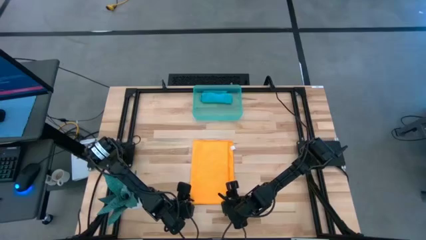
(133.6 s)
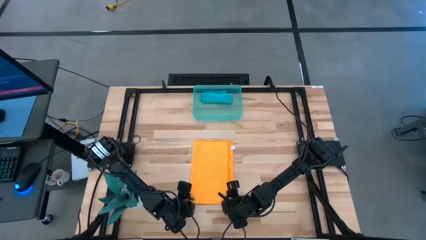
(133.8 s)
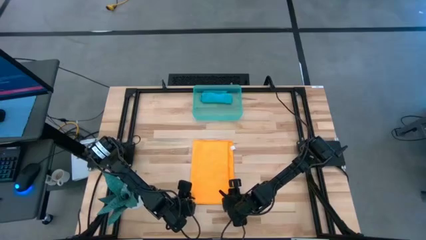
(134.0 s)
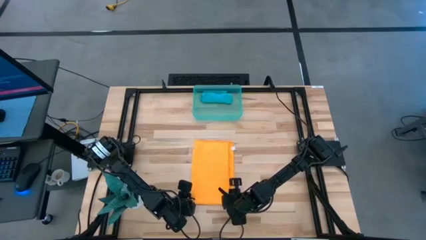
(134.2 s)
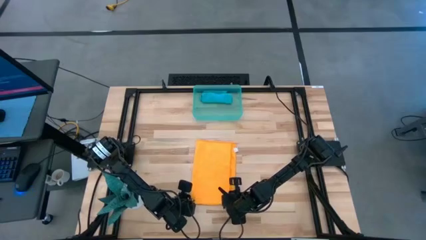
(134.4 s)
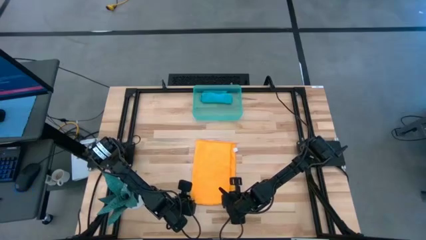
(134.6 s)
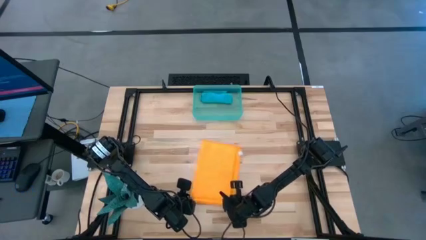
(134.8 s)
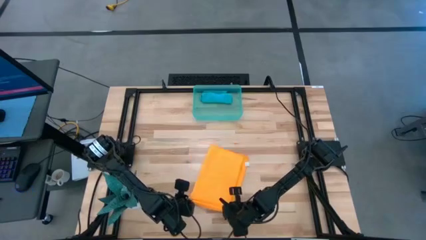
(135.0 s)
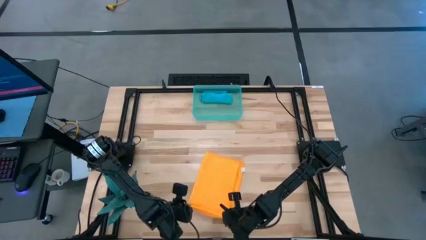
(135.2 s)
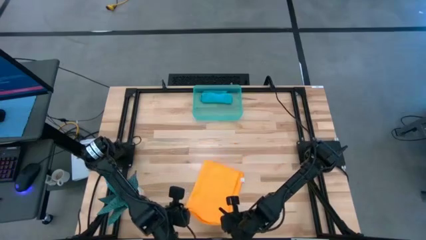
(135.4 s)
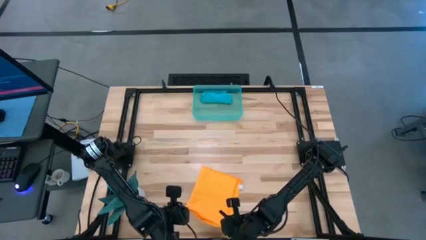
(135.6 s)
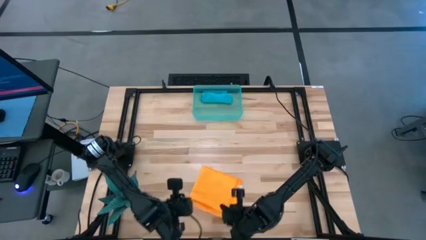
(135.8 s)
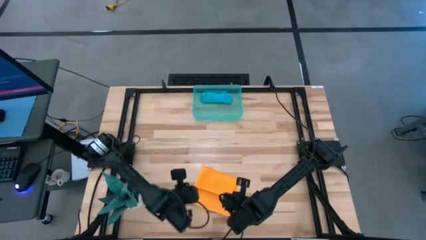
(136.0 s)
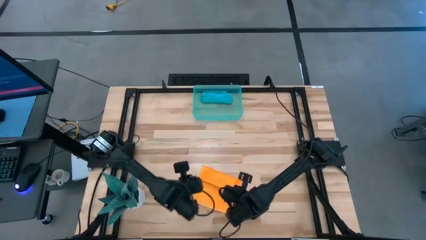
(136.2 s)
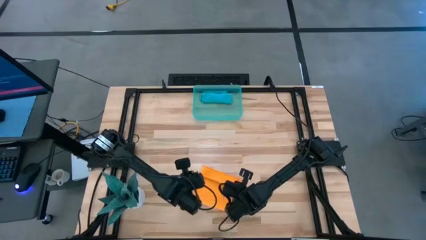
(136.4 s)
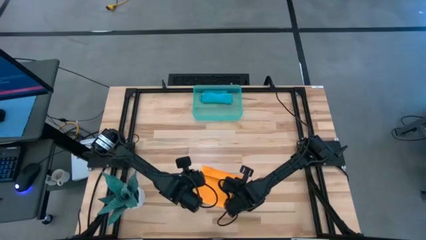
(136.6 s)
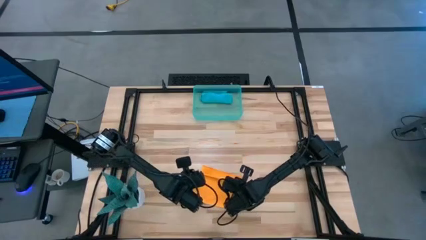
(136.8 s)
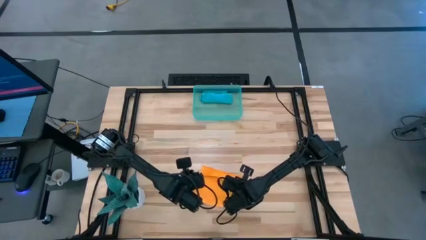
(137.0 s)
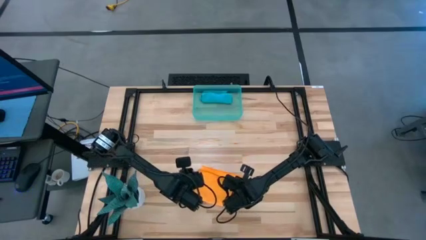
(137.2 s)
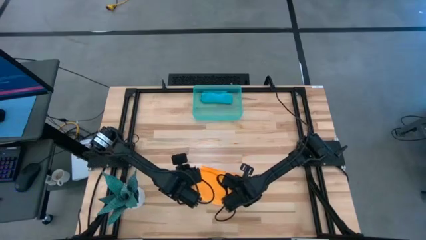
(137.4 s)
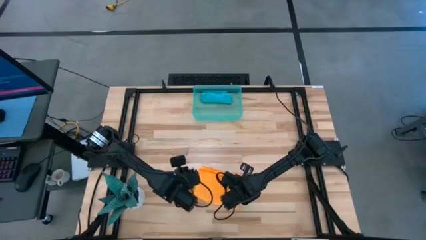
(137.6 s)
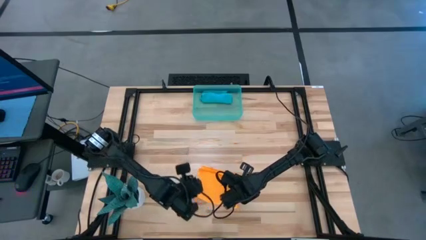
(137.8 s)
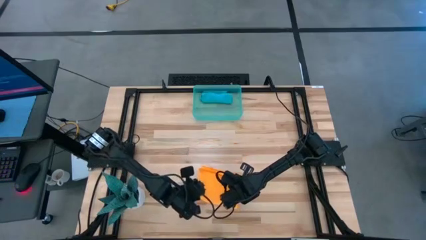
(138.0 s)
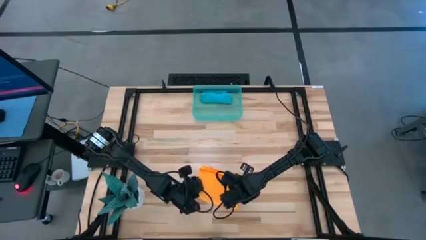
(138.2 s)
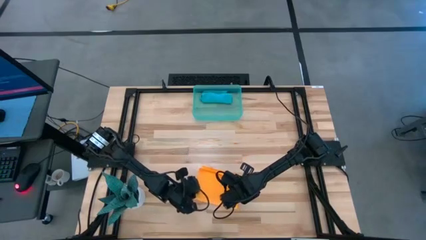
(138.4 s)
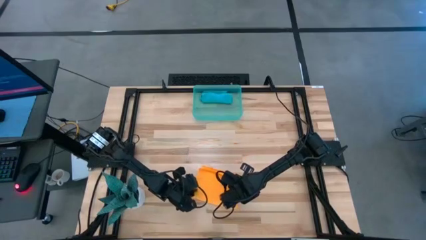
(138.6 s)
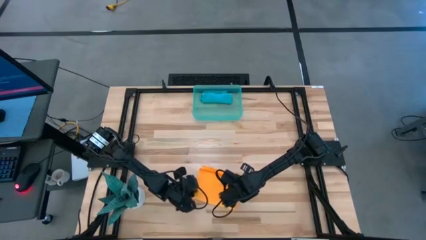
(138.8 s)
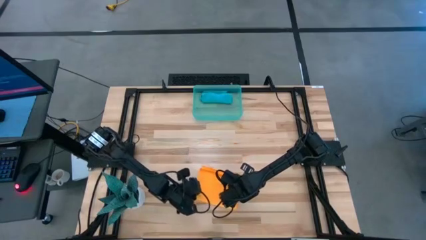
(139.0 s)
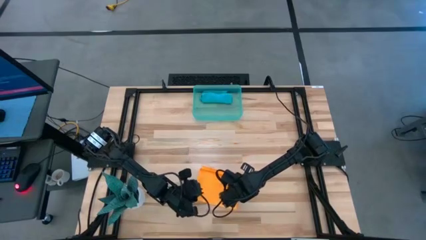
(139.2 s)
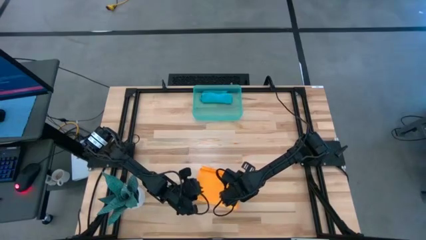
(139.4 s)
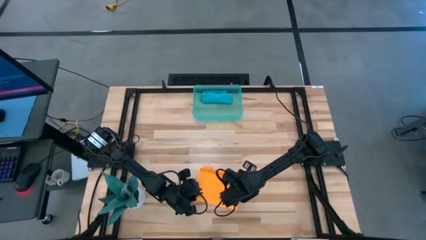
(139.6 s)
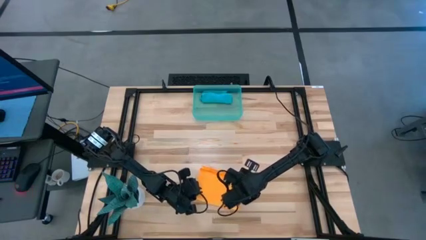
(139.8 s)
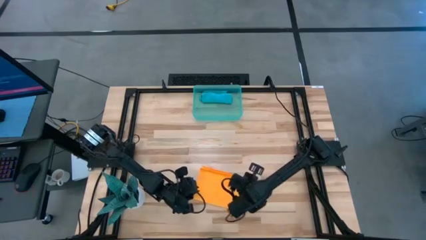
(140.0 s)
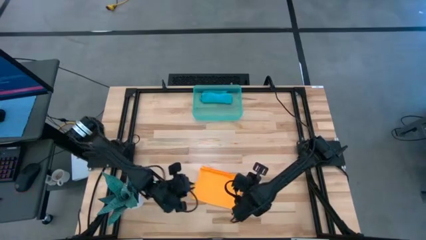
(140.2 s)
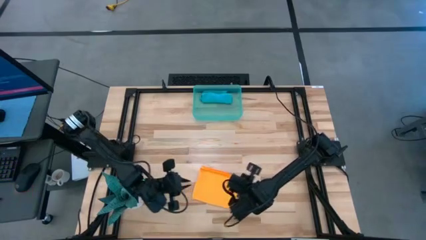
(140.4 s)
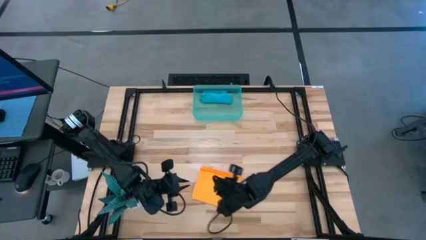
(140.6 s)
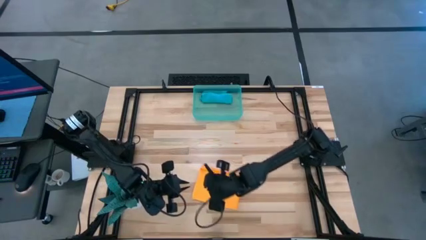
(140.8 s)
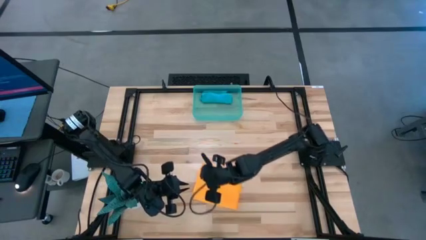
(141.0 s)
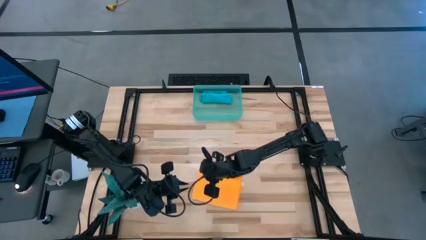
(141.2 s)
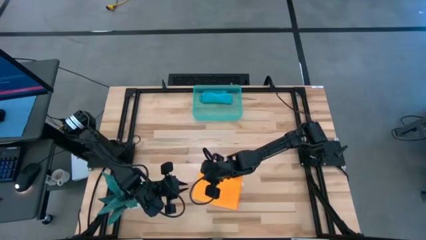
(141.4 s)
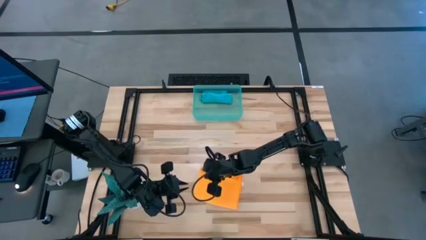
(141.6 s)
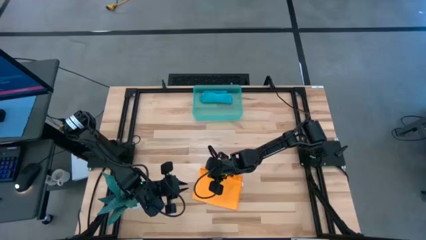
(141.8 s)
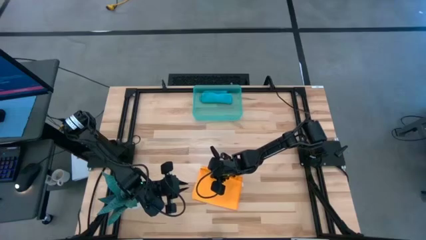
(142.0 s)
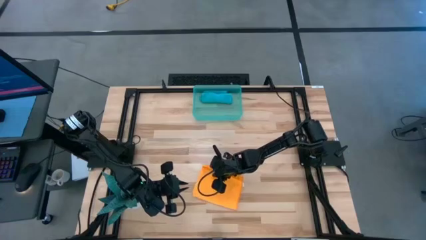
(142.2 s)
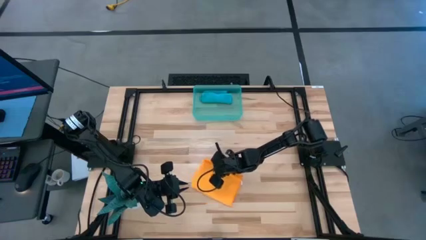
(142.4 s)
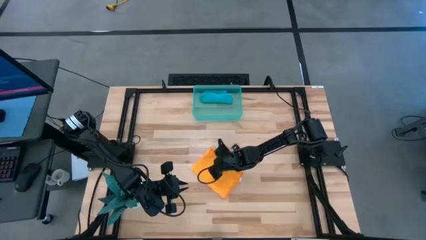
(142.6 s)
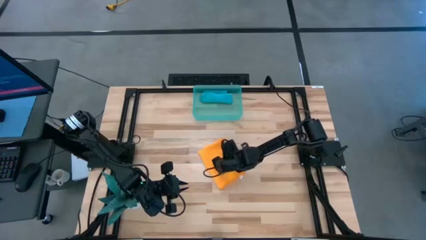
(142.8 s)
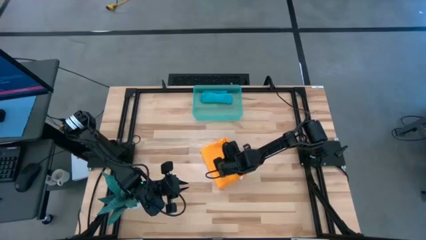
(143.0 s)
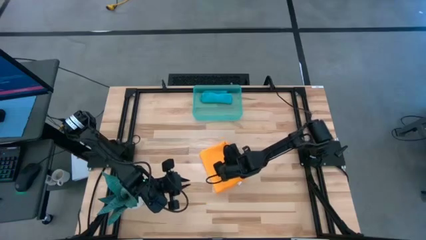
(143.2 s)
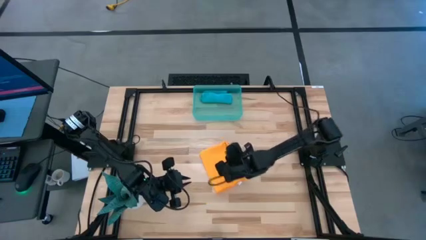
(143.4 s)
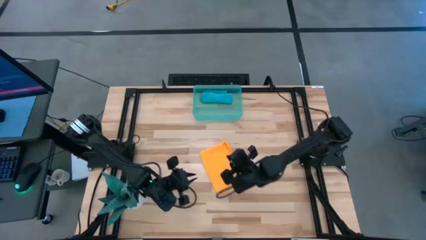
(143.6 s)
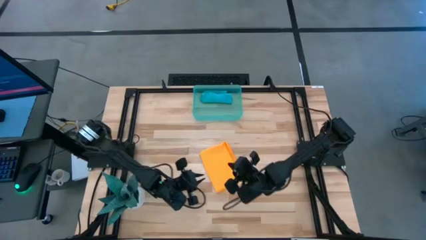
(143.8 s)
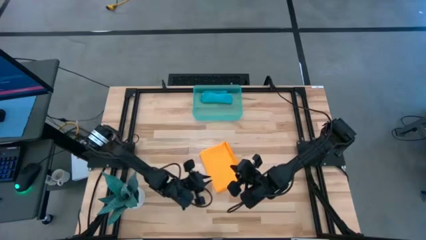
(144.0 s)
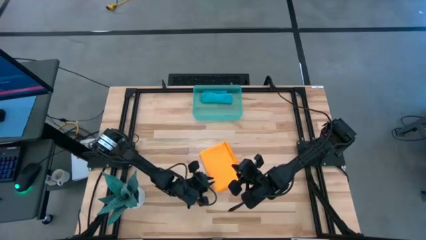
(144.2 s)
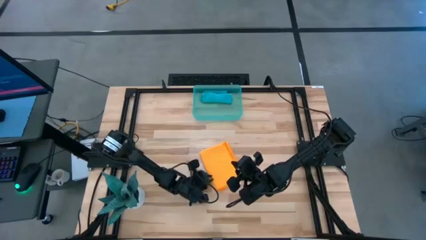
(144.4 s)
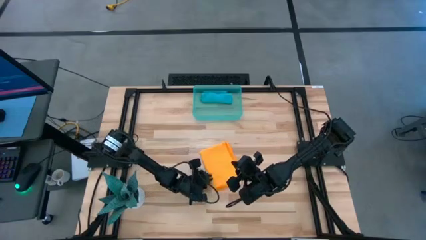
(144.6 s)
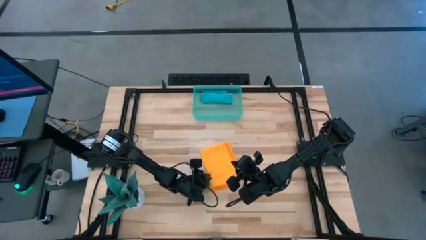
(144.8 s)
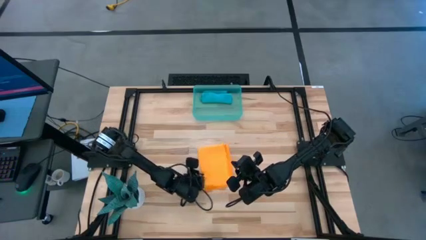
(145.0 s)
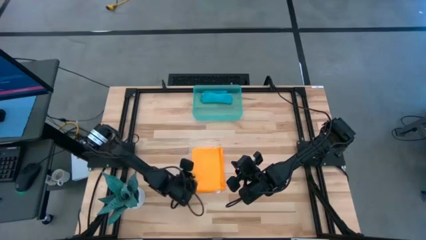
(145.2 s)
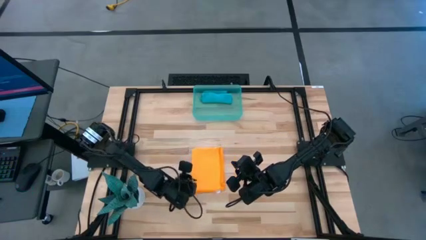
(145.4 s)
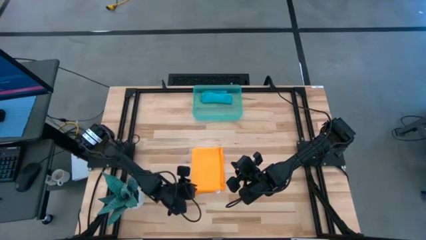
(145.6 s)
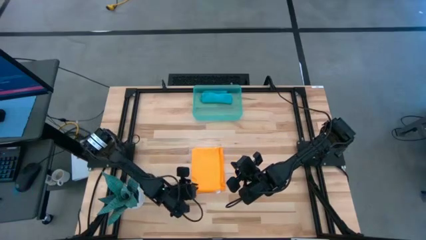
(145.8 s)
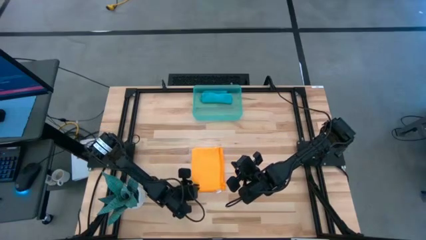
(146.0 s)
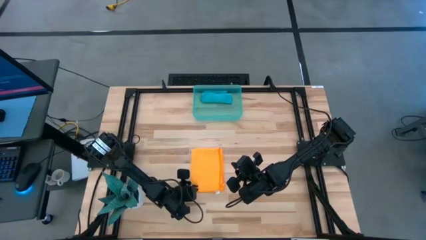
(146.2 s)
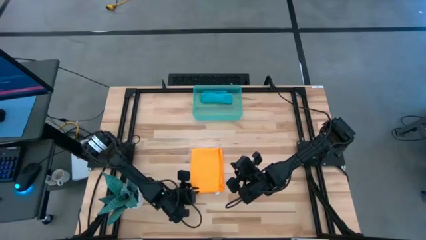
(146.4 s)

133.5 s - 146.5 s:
Task: Roll microfiber towels into tight, uniform cylinder then place into a basket
Fold the orange microfiber cloth

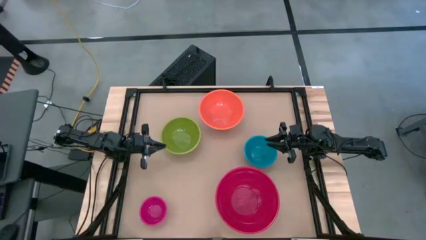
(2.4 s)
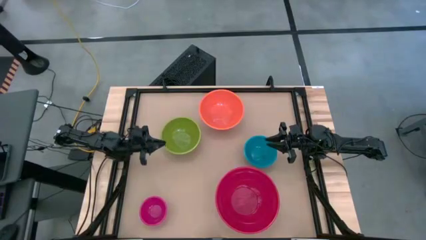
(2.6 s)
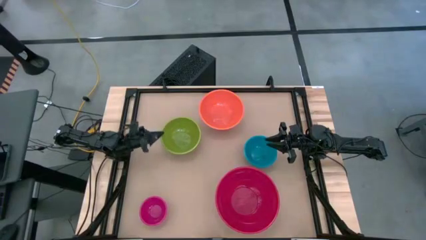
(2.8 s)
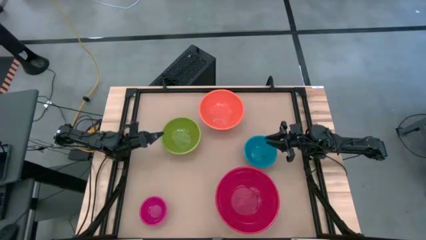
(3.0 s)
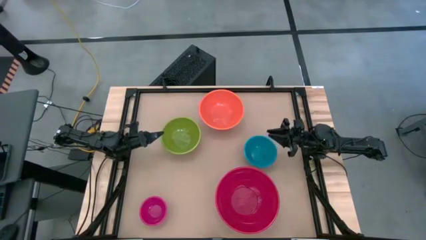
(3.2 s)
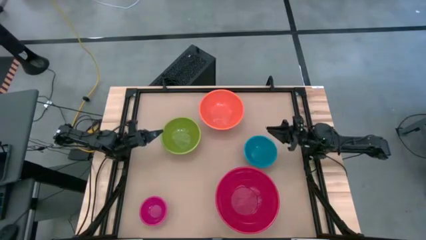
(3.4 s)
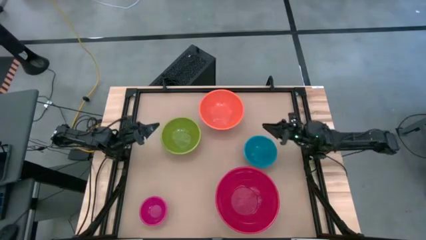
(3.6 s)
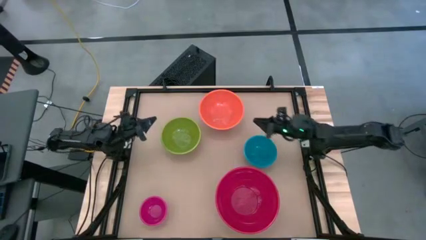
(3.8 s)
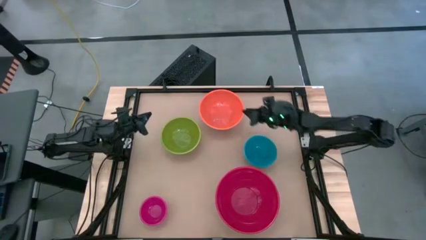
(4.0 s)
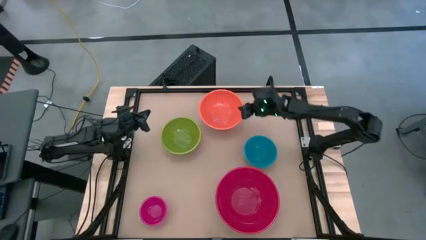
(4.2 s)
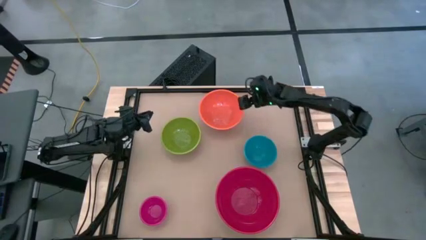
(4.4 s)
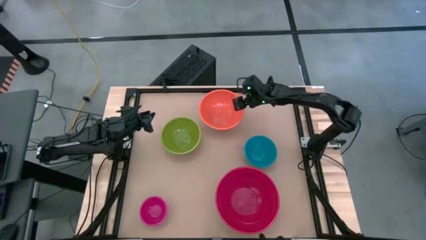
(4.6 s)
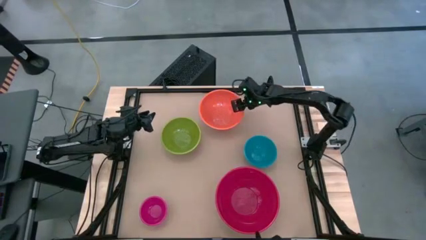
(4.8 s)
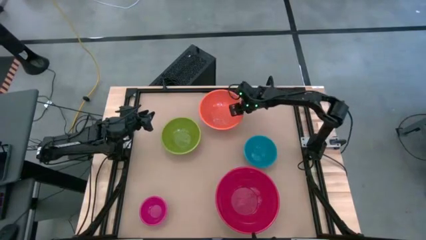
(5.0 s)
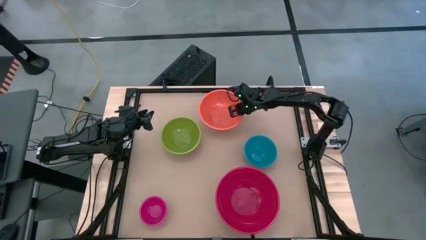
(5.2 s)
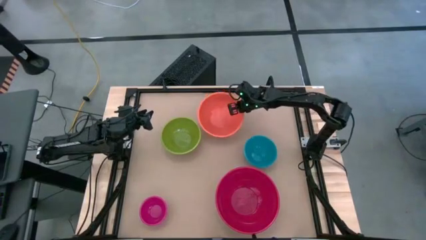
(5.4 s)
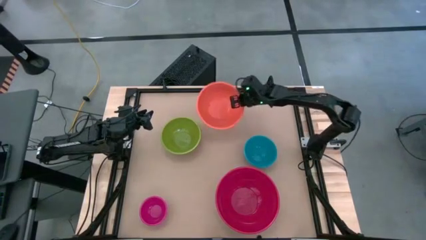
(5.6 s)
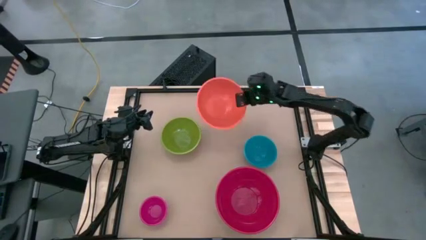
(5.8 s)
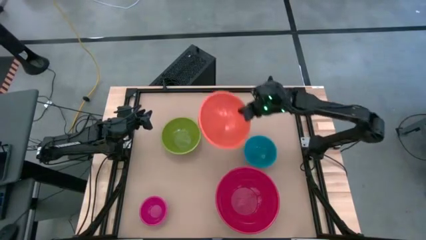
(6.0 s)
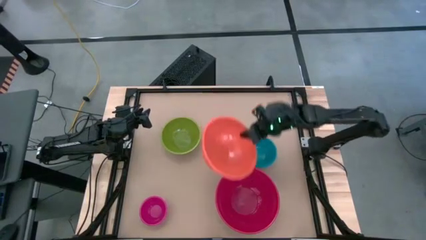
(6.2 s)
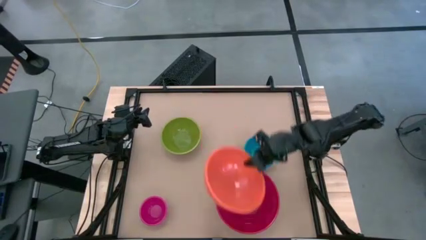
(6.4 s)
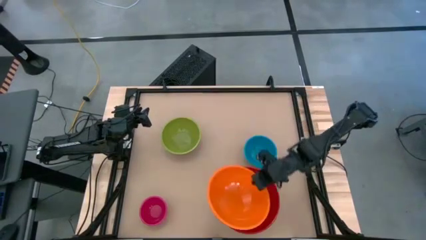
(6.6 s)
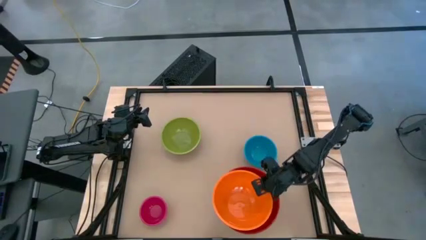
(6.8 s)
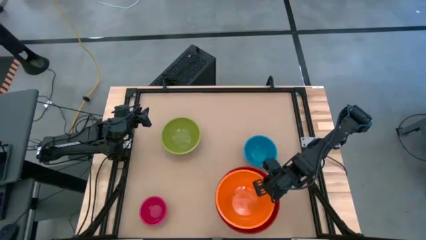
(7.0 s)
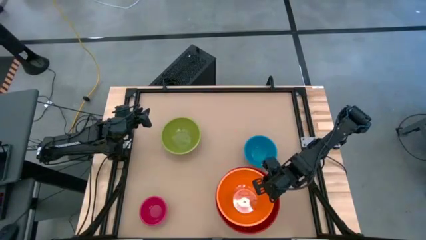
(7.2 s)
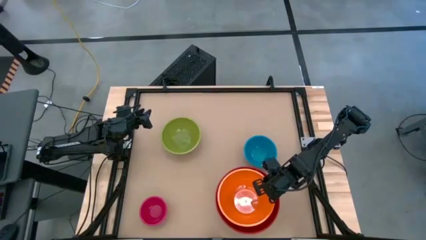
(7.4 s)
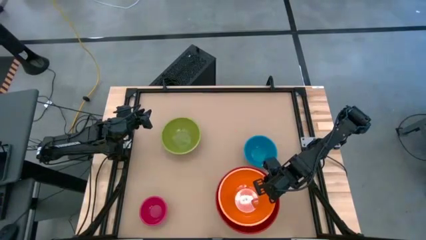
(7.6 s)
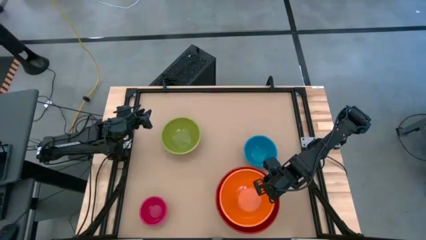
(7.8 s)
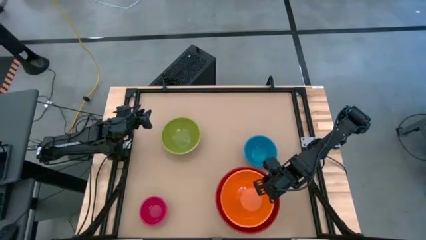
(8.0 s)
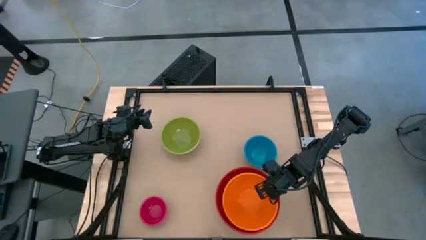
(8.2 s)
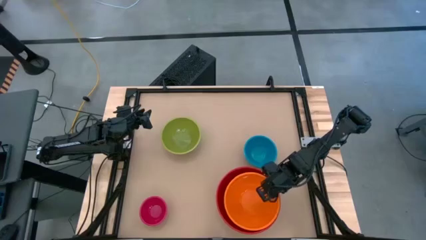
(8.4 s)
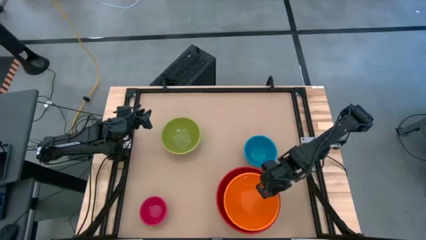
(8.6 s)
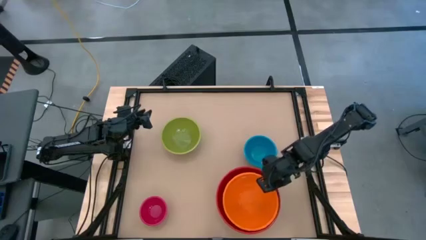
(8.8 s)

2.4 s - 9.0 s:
Task: Nest bowls inside each other by size order
Stack the orange bowl on the red bowl
